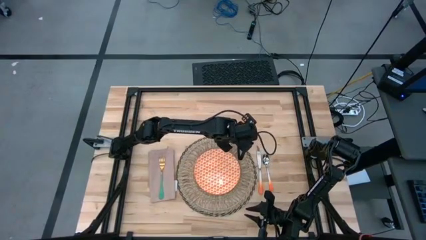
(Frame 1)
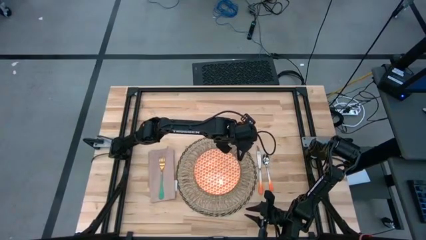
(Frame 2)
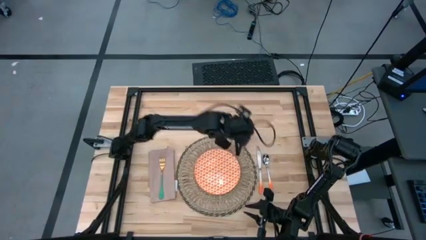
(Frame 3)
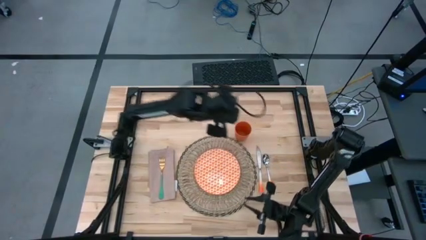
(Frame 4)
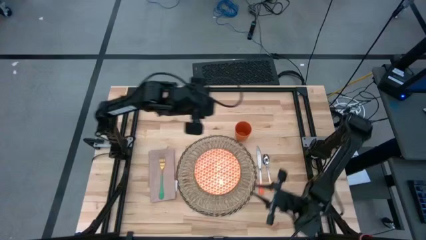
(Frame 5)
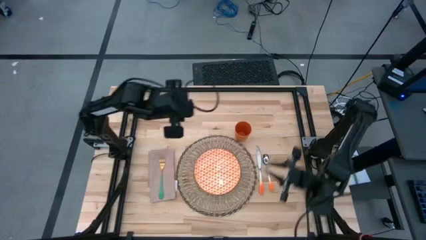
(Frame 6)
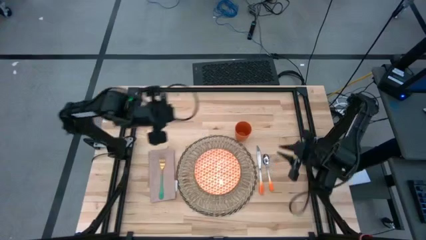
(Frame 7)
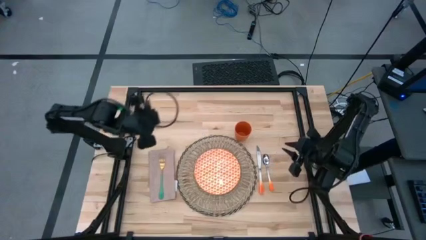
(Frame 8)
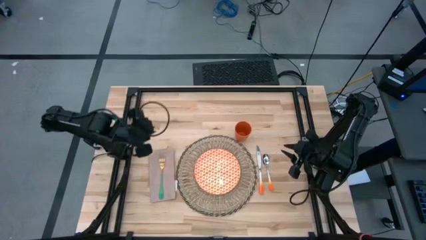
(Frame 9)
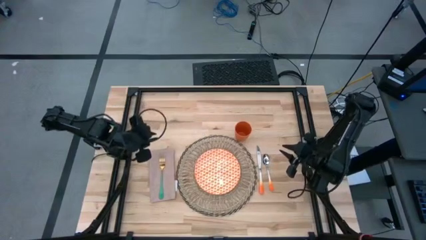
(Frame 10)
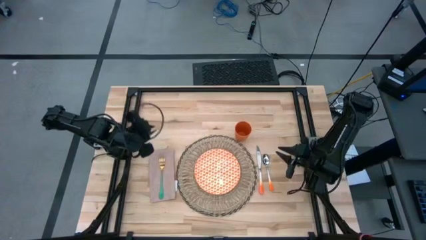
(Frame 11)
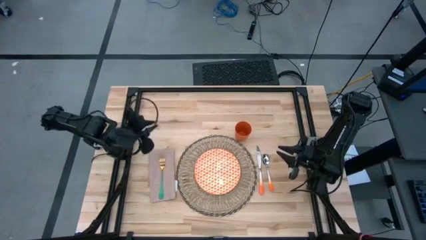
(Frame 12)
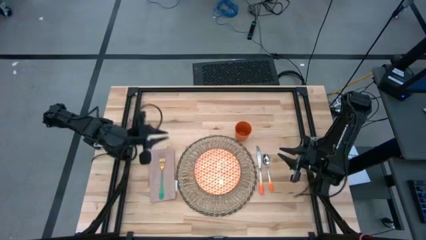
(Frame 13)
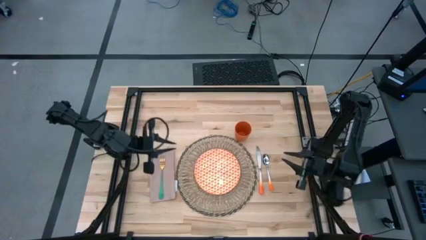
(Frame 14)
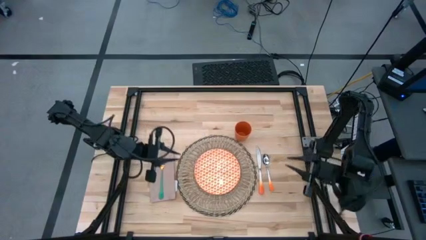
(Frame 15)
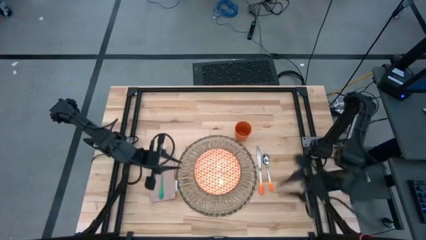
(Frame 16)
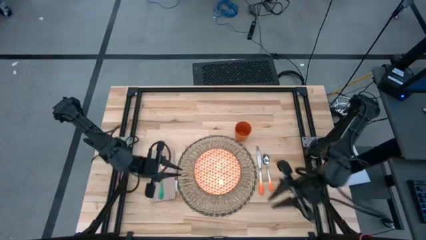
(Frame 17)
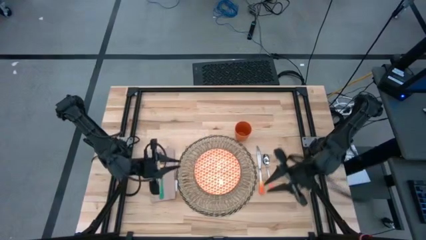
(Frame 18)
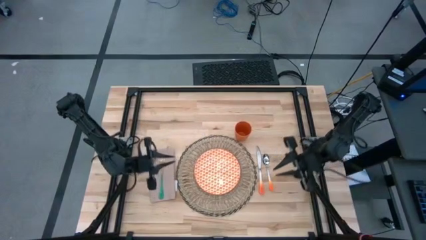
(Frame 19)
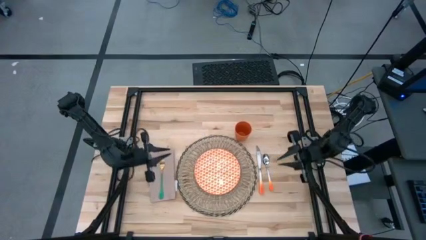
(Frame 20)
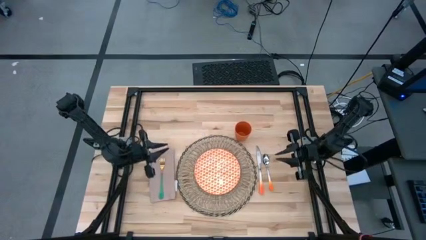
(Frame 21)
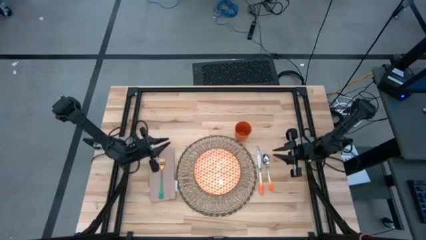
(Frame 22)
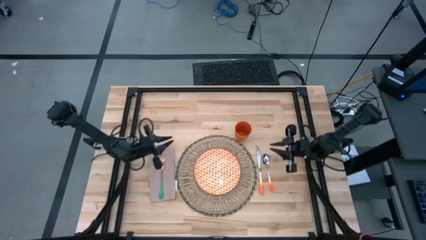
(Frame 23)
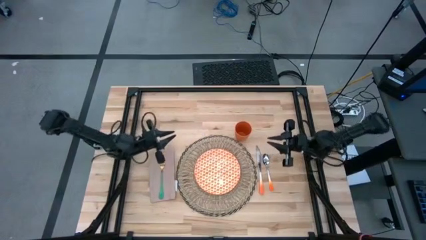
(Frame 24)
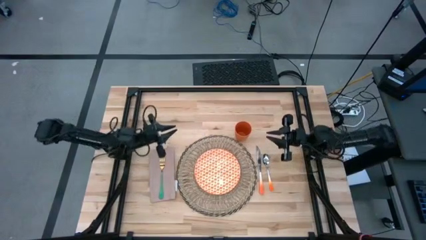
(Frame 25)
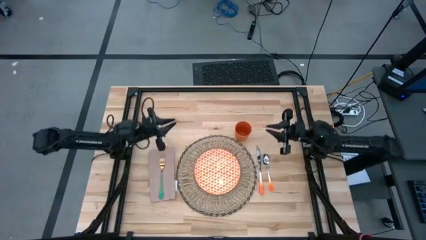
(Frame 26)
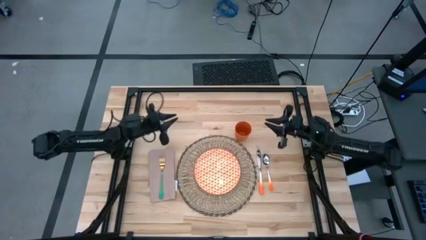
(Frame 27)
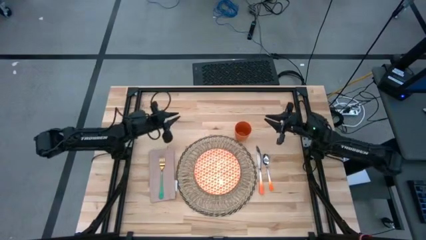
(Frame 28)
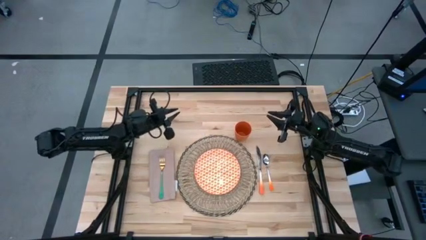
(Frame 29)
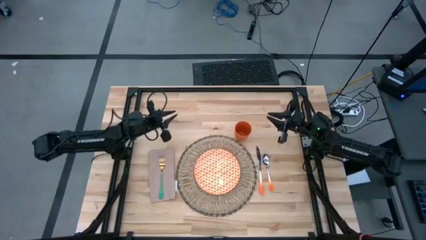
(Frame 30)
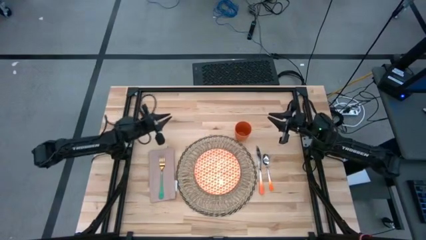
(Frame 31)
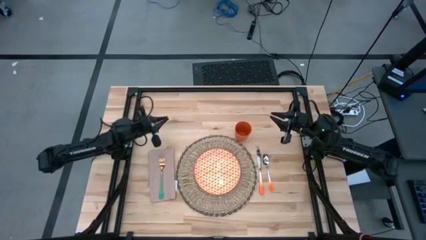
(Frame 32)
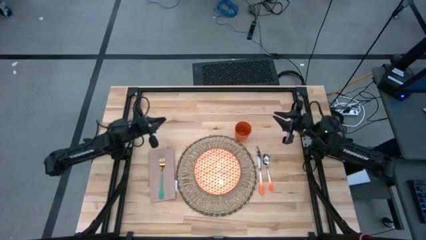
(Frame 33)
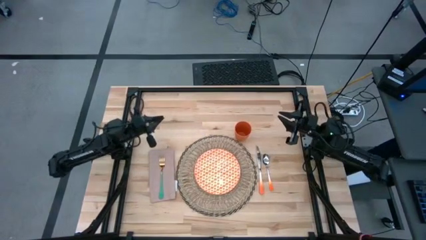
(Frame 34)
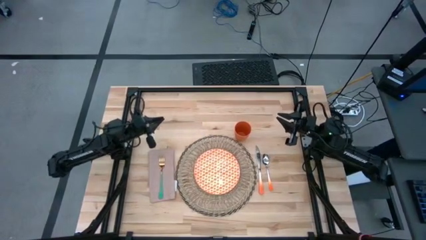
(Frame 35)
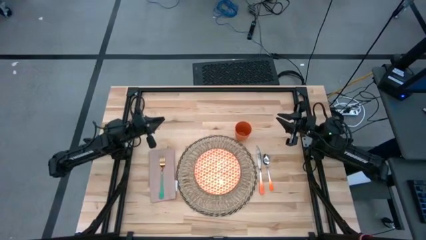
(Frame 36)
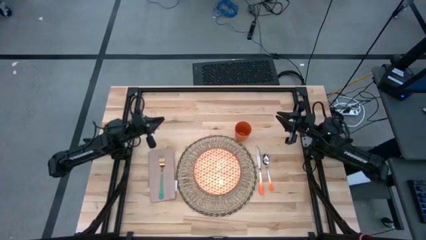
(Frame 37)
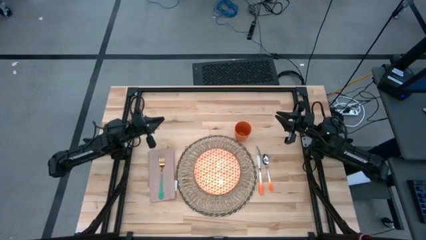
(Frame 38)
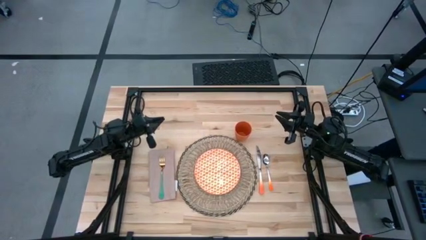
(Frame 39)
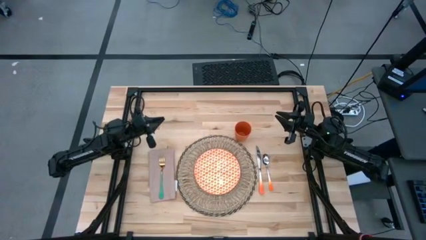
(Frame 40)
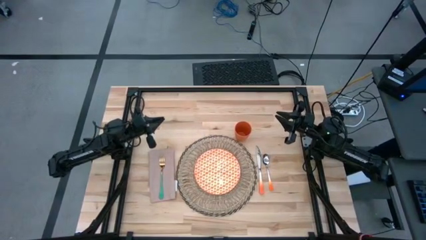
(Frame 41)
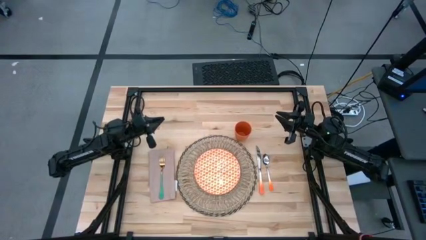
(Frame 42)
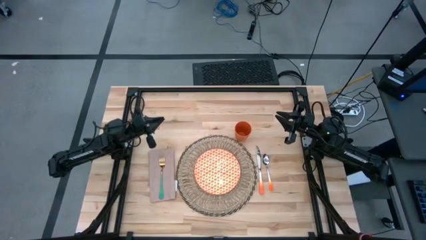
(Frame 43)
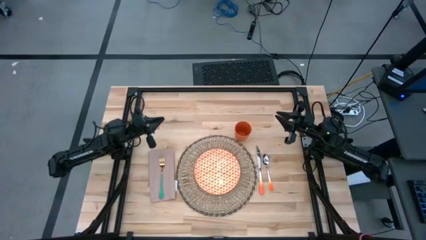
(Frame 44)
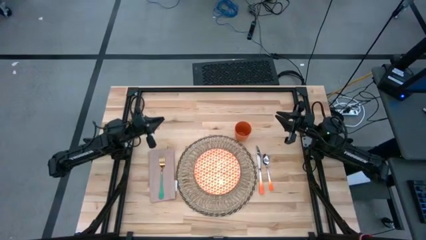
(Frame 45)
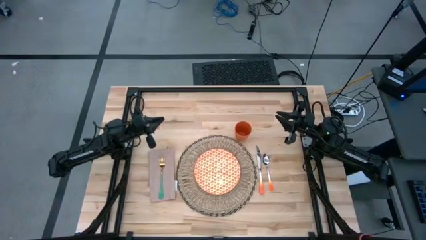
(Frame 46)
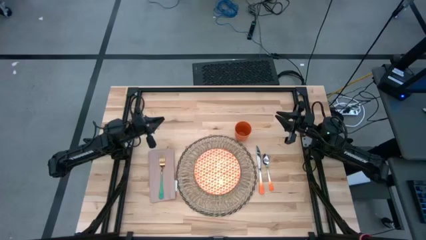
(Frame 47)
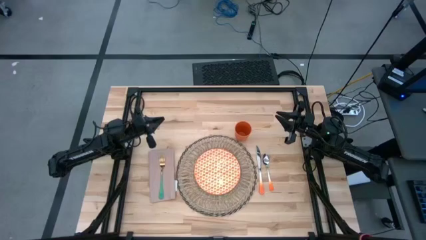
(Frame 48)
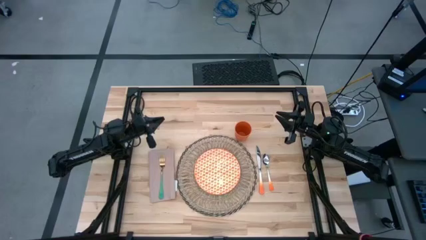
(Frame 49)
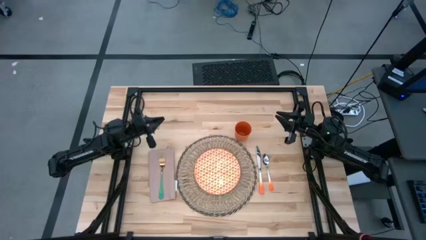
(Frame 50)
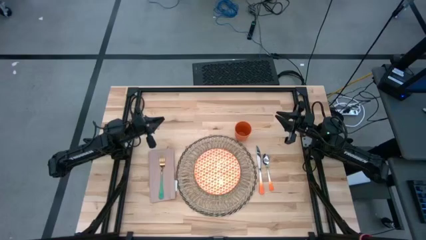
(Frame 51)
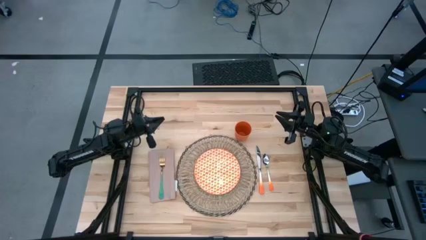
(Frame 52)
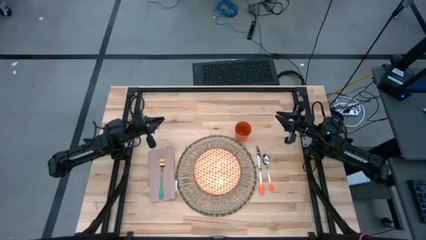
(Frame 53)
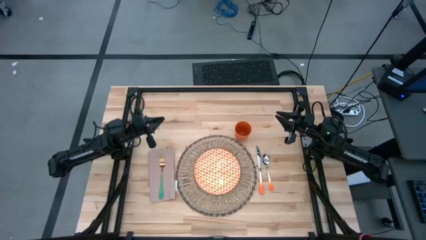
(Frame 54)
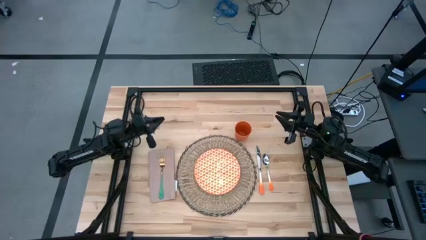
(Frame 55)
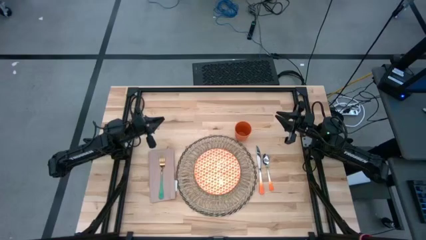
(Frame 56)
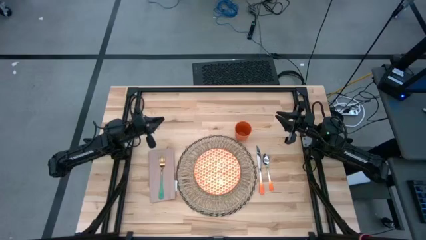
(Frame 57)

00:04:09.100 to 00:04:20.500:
Task: Set table place
Return to Home Position

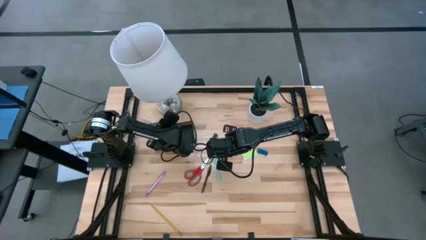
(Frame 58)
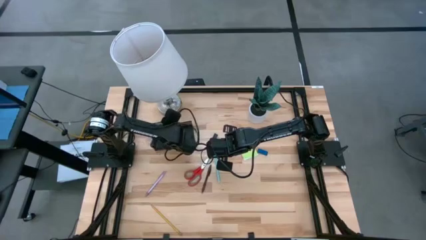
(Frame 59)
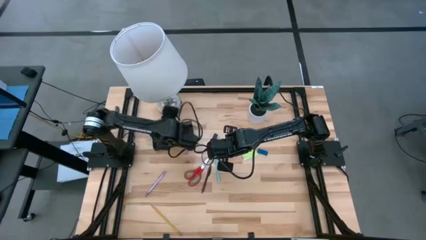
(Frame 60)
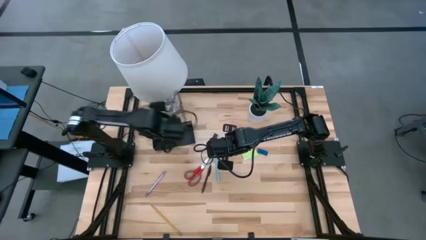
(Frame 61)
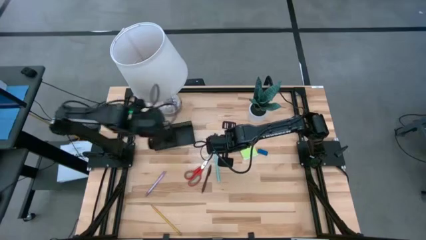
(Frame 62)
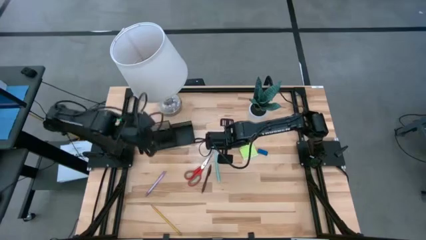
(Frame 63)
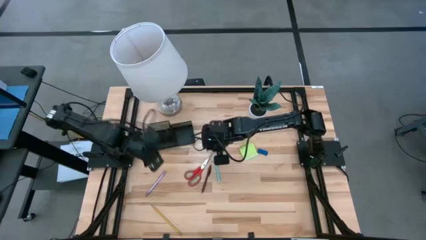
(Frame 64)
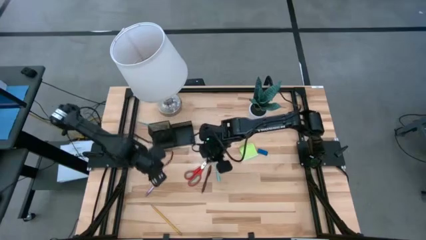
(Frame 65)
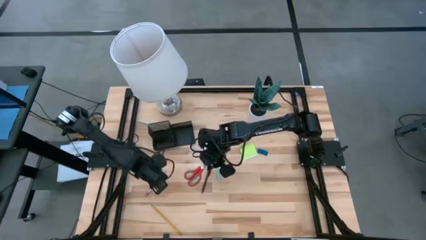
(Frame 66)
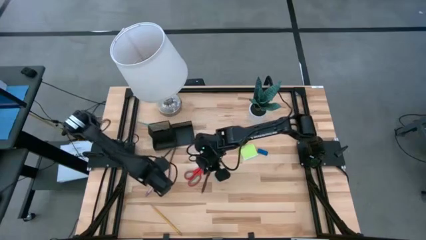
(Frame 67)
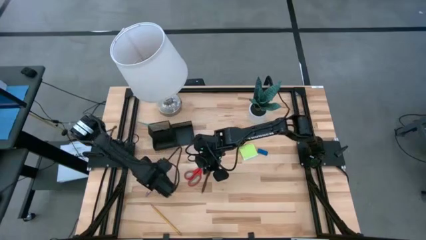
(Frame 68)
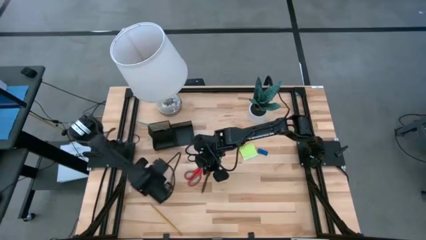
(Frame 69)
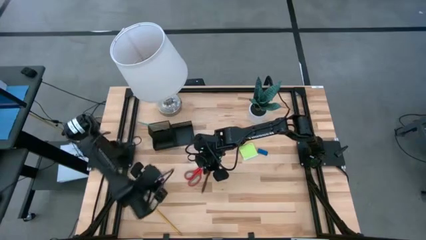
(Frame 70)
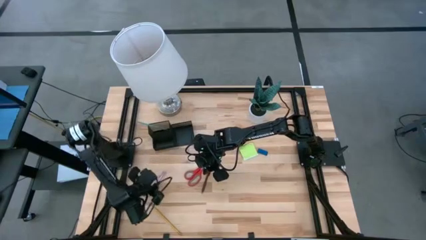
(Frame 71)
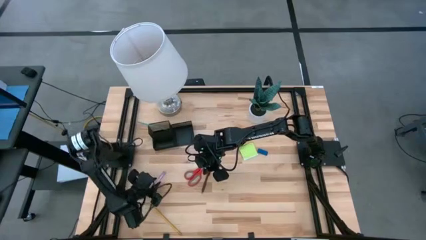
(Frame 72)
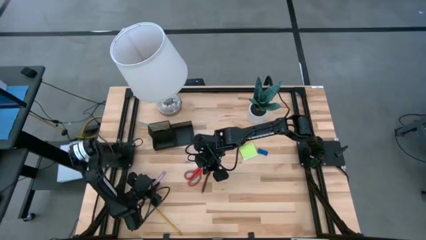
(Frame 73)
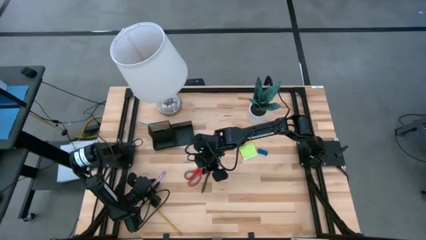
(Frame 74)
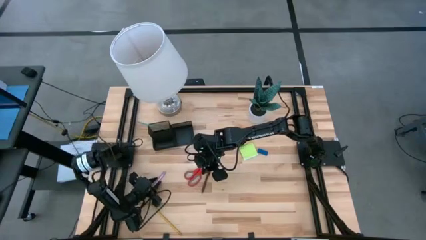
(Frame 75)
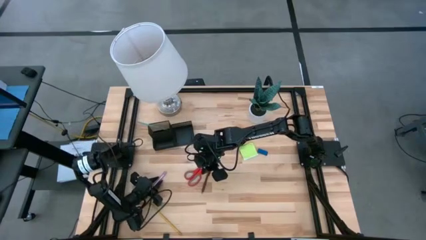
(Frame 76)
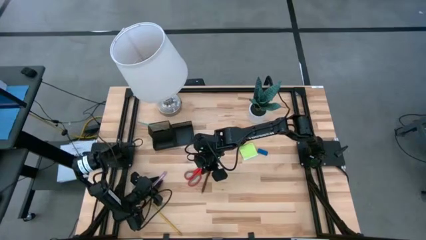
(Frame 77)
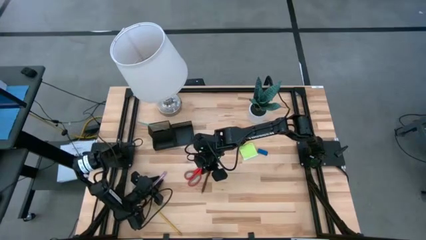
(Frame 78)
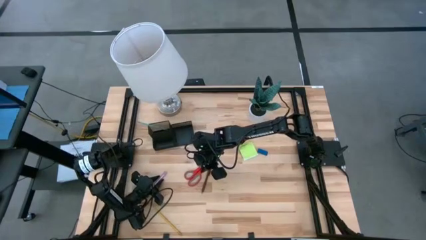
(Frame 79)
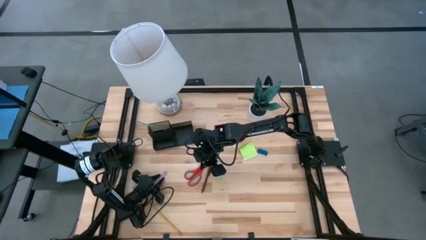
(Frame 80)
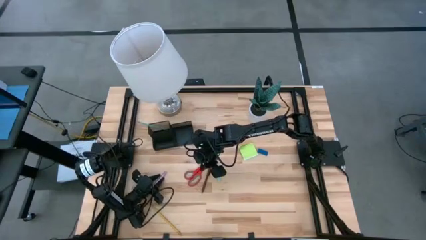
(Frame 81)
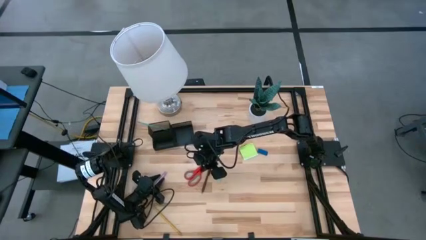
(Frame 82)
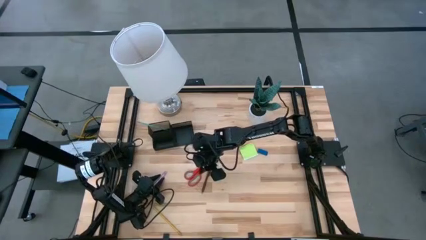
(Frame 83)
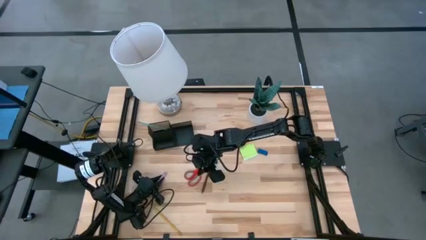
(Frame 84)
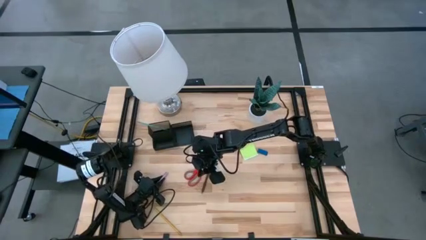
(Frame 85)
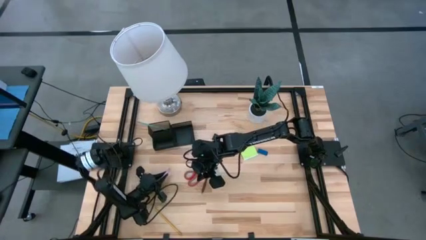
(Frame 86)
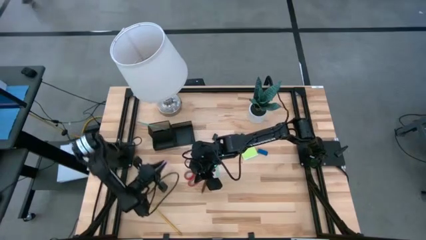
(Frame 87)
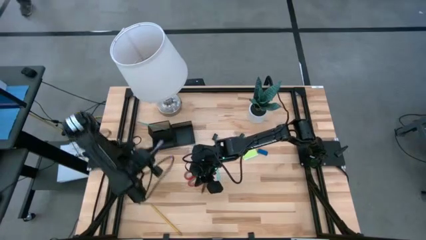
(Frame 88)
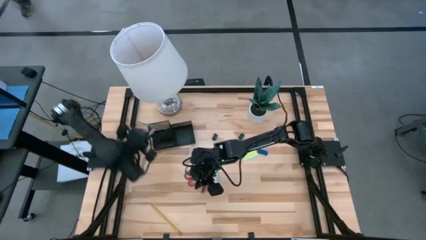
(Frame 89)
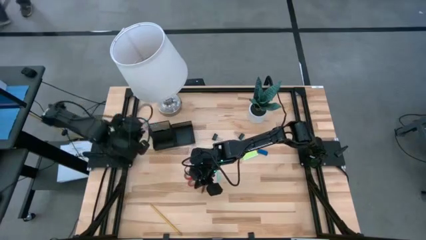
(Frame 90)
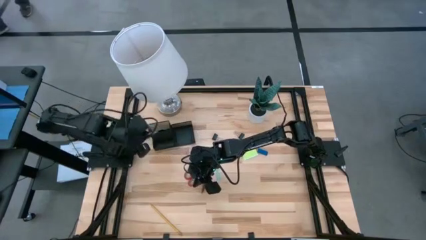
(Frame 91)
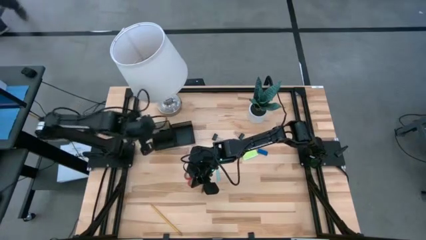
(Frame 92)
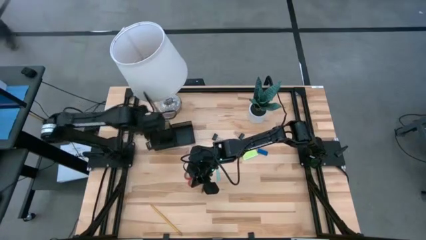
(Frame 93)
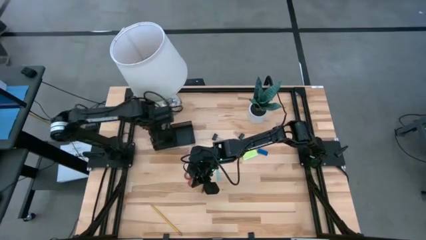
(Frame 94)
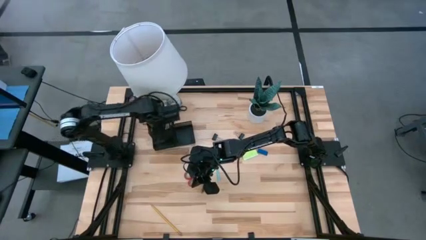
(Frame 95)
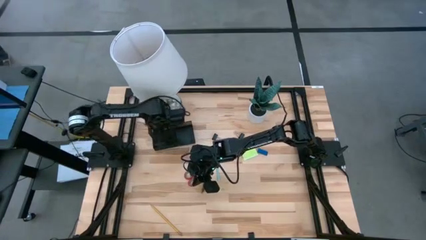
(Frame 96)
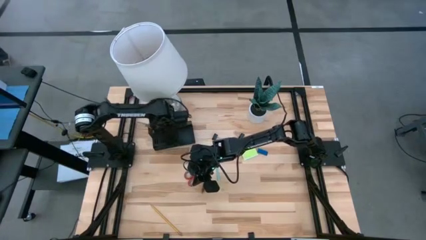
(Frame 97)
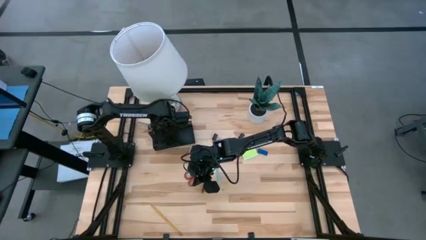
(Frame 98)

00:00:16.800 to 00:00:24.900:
Task: Pick and place office supplies into organizer
Put the purple pen into the black desk organizer
